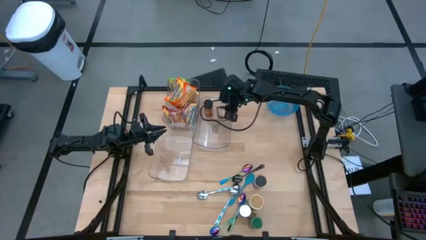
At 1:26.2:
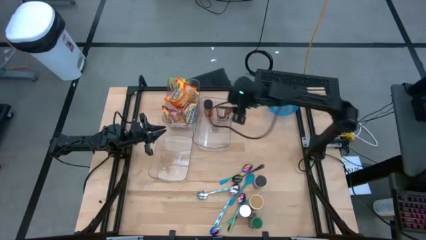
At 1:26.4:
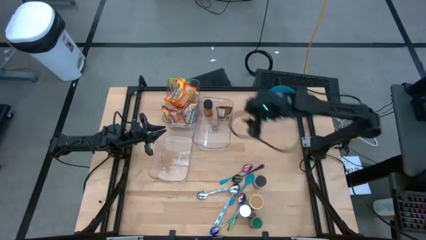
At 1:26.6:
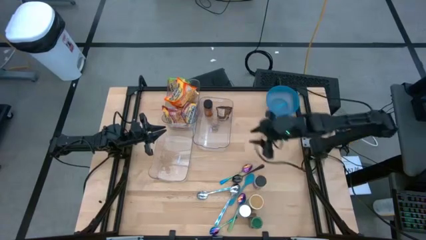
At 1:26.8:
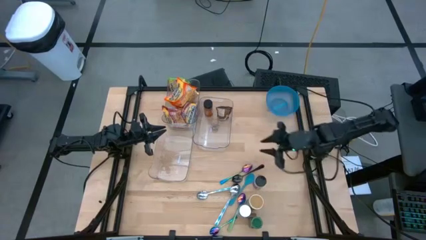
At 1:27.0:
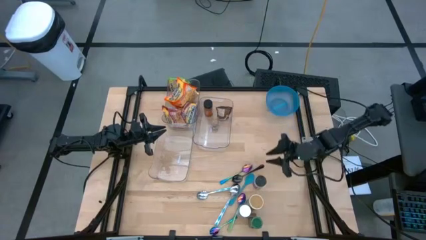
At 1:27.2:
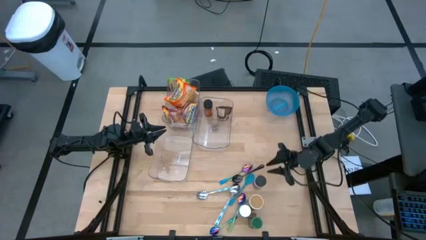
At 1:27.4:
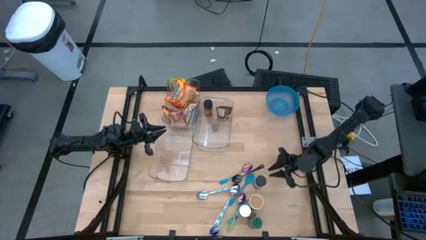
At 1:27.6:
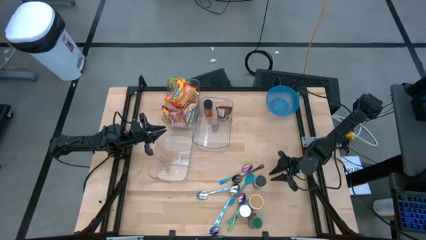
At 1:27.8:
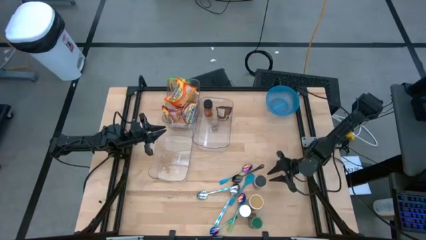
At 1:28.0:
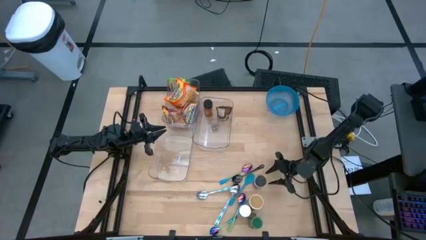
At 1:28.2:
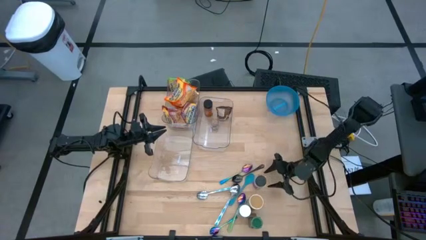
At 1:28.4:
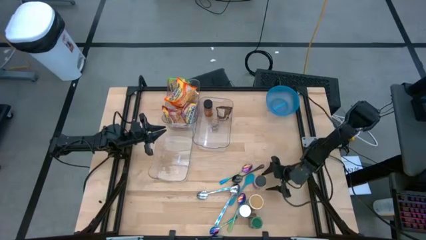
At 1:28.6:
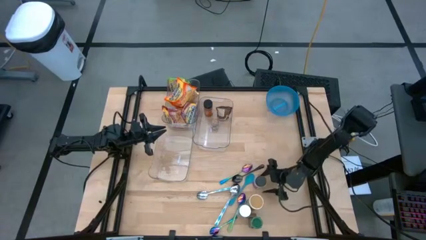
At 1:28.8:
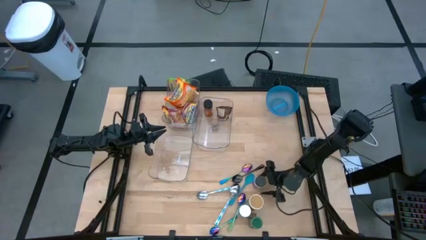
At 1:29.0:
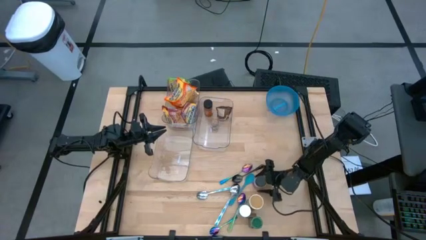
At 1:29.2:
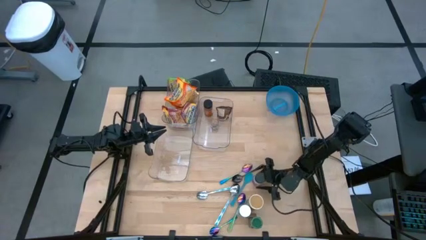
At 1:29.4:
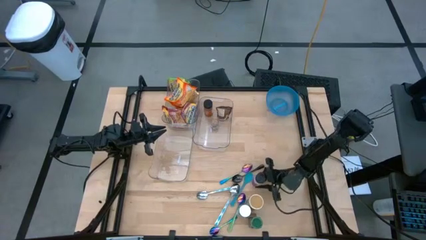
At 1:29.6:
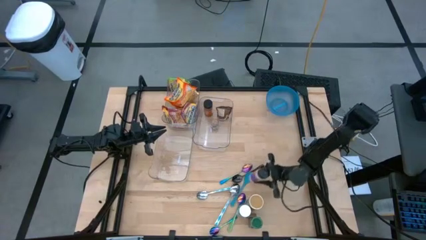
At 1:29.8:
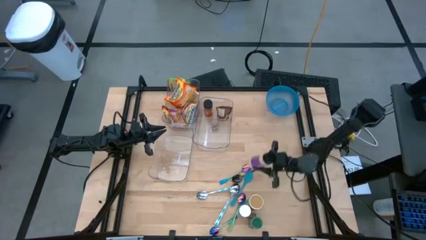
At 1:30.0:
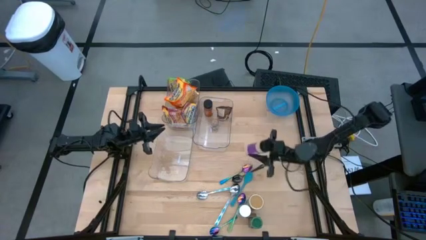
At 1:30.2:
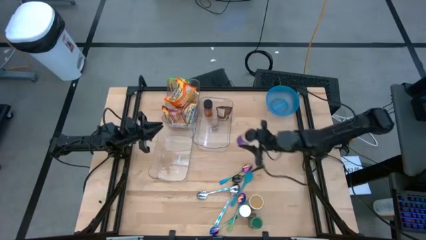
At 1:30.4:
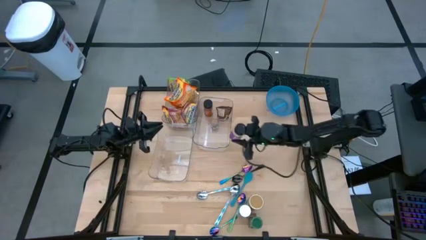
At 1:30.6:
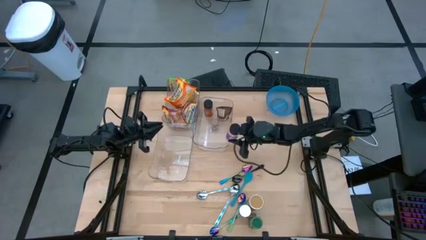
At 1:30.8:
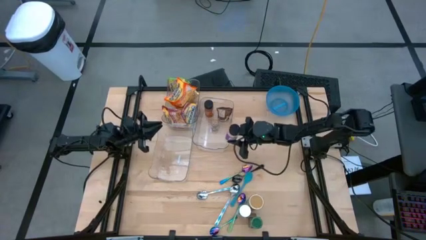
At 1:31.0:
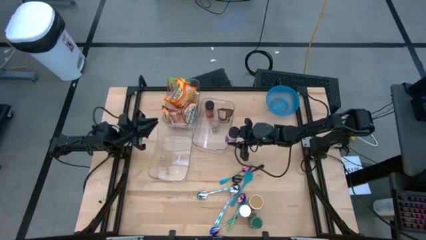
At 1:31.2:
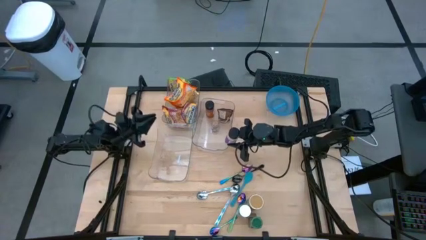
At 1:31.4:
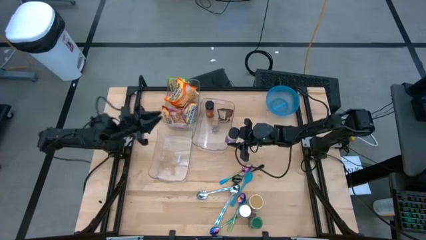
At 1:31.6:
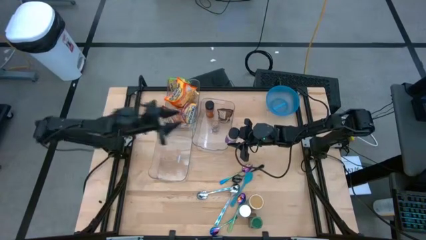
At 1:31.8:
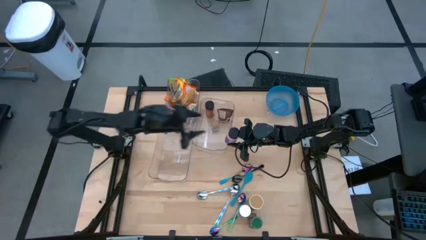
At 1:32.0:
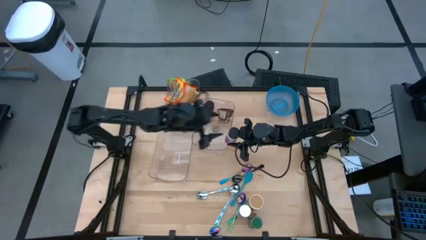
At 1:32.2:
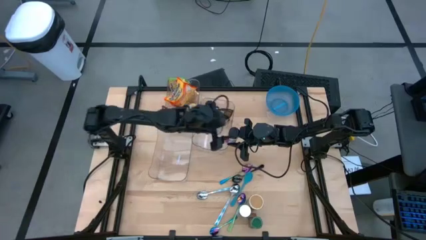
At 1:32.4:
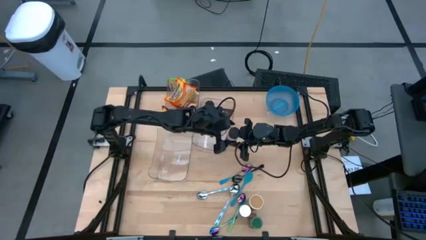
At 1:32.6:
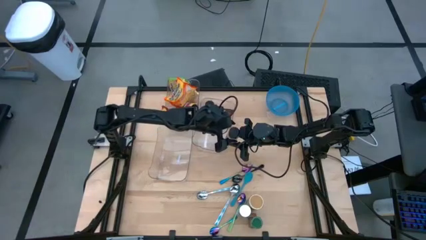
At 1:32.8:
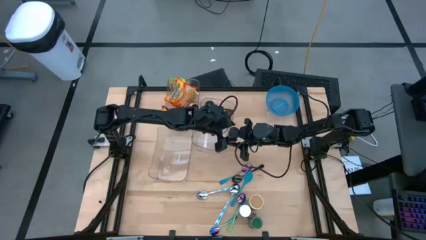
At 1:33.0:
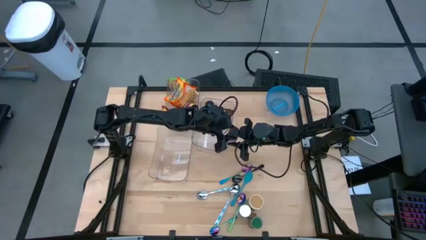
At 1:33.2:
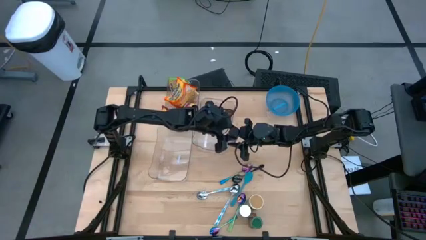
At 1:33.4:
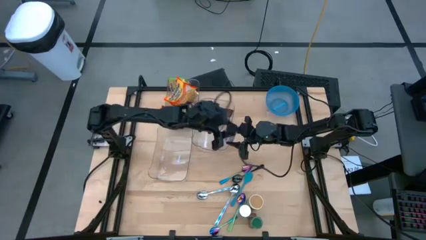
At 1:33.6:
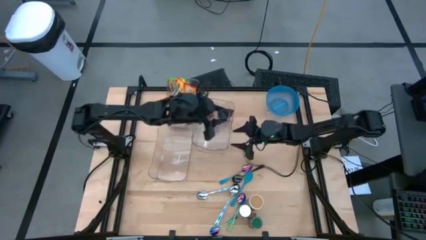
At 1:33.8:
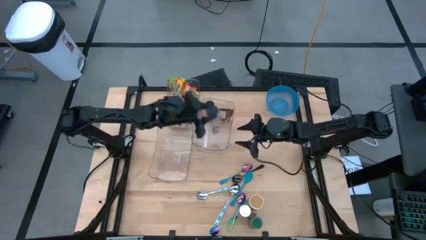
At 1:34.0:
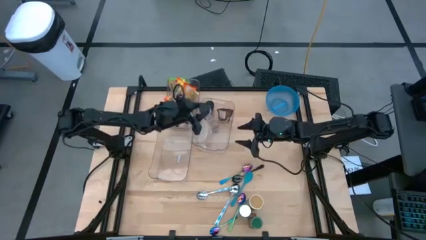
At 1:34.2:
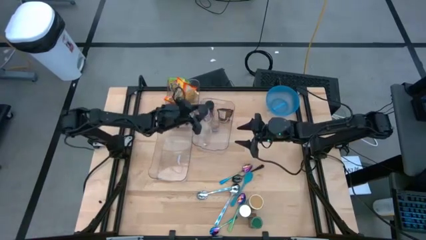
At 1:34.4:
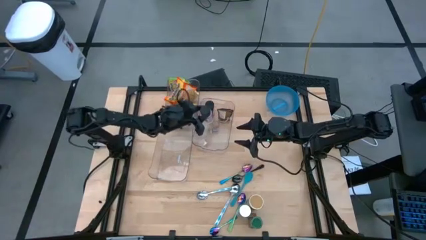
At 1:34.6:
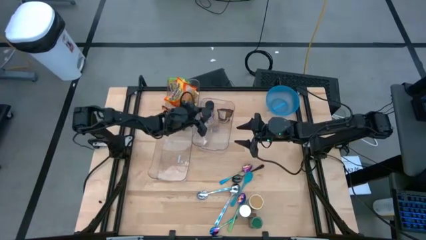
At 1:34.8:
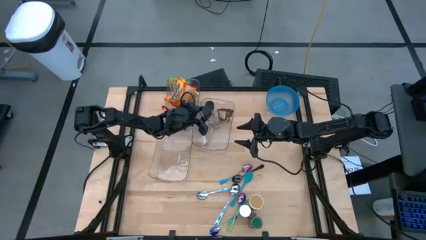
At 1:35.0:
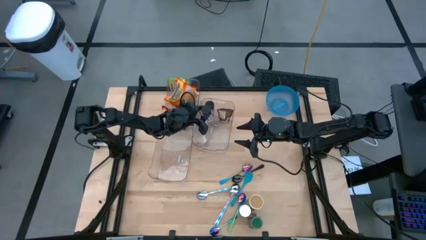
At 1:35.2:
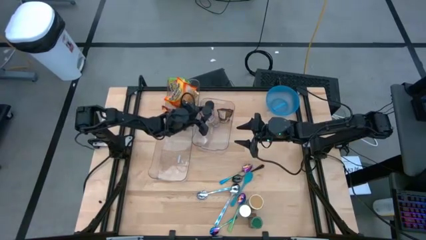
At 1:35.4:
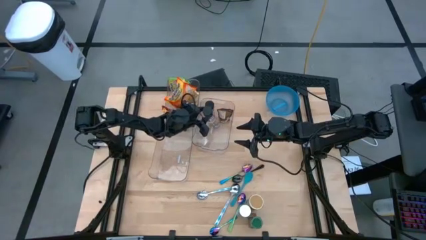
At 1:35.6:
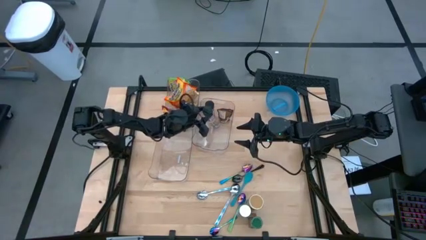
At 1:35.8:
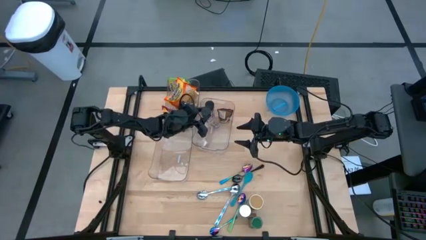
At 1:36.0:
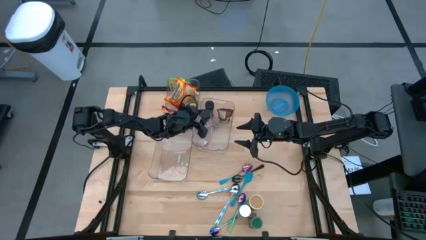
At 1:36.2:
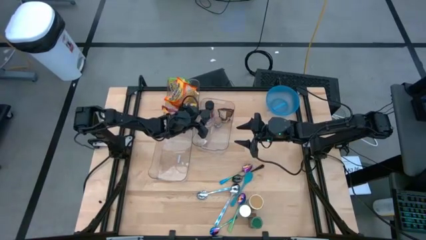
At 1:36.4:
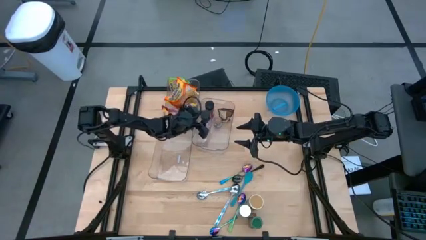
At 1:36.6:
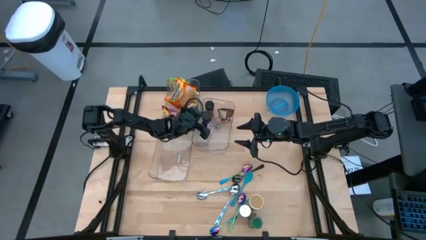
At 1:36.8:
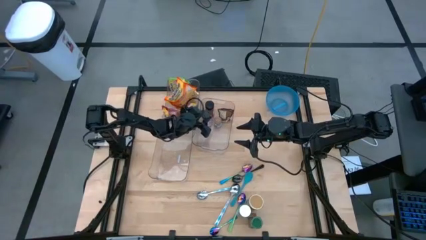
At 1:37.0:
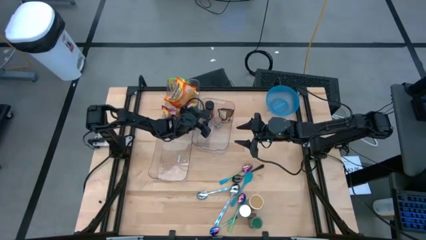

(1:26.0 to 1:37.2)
Task: Pick & Place Food Item
Put the purple spice bottle into the middle transparent bin

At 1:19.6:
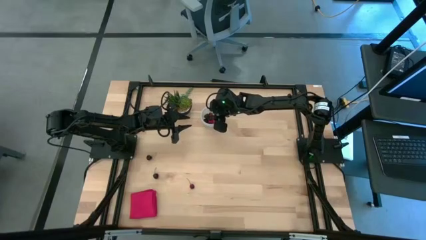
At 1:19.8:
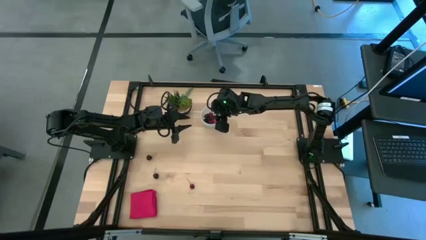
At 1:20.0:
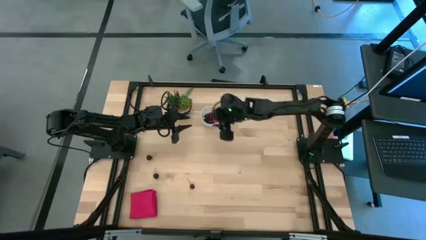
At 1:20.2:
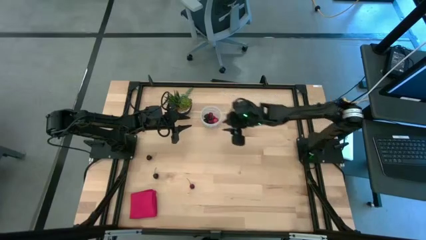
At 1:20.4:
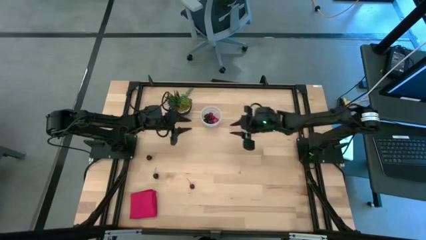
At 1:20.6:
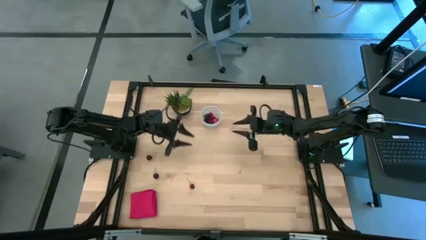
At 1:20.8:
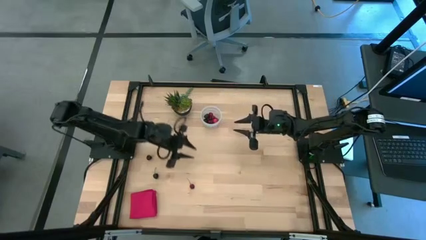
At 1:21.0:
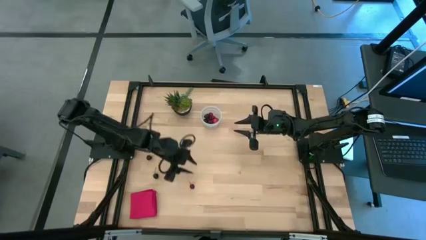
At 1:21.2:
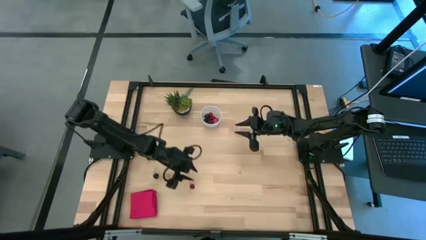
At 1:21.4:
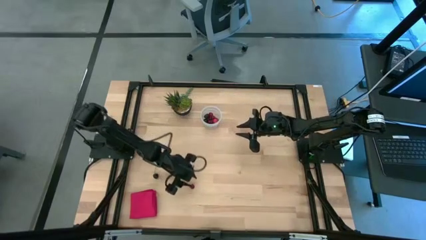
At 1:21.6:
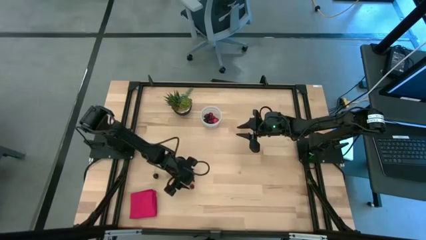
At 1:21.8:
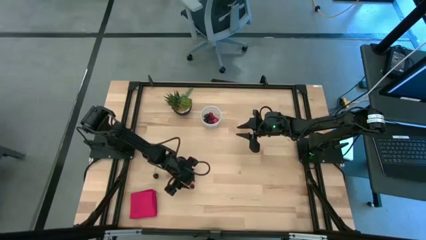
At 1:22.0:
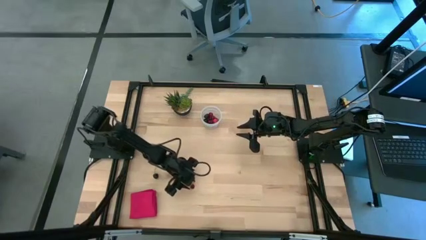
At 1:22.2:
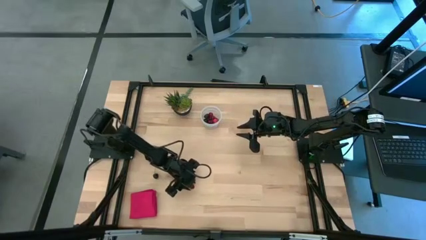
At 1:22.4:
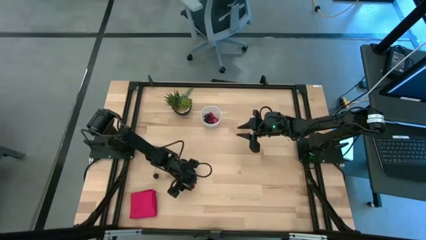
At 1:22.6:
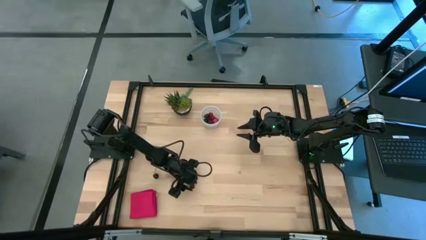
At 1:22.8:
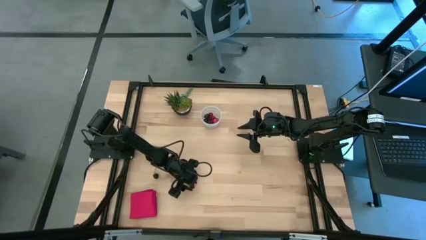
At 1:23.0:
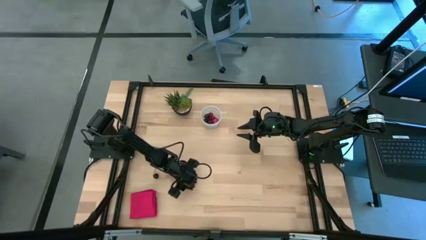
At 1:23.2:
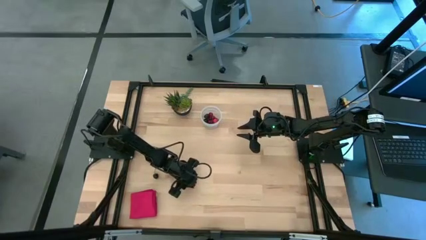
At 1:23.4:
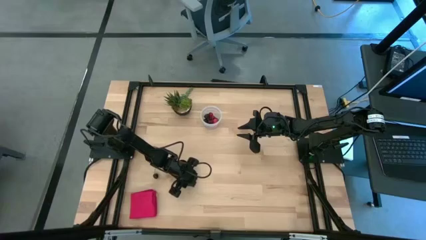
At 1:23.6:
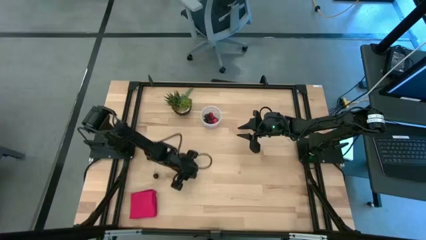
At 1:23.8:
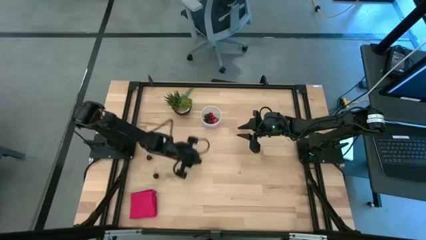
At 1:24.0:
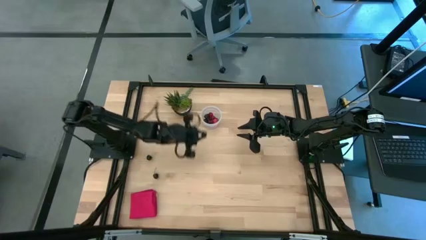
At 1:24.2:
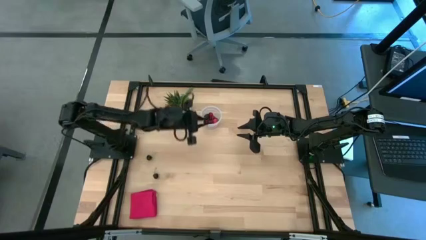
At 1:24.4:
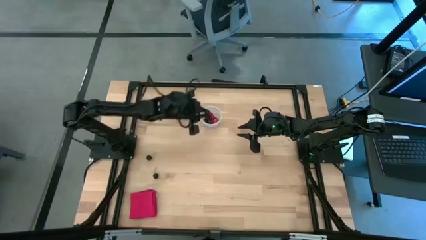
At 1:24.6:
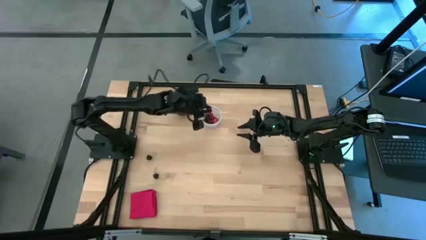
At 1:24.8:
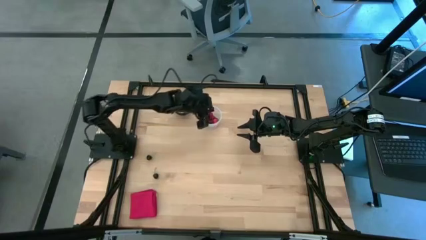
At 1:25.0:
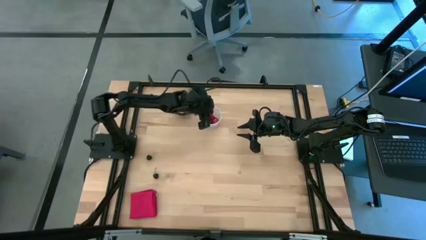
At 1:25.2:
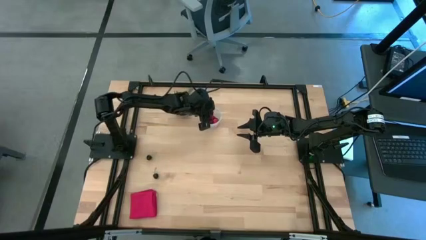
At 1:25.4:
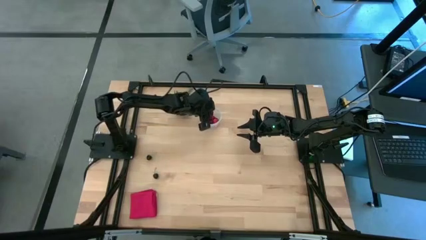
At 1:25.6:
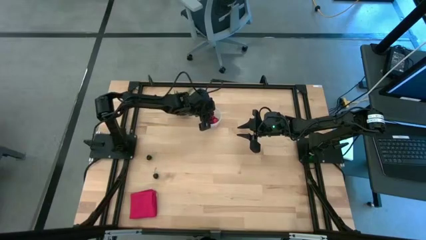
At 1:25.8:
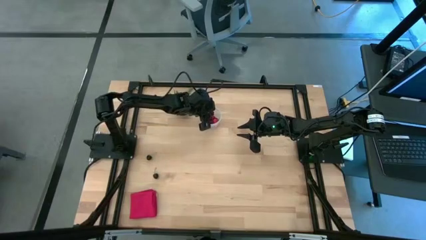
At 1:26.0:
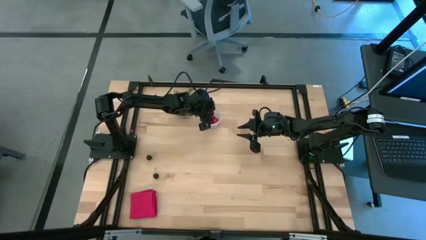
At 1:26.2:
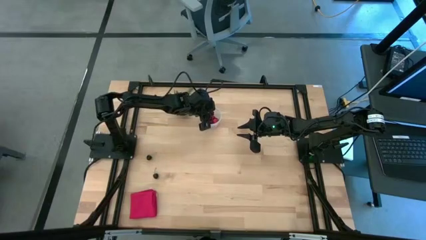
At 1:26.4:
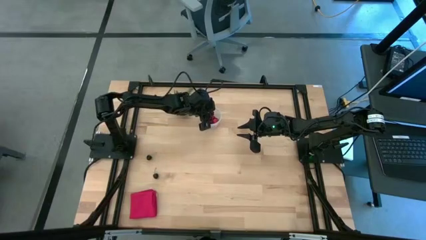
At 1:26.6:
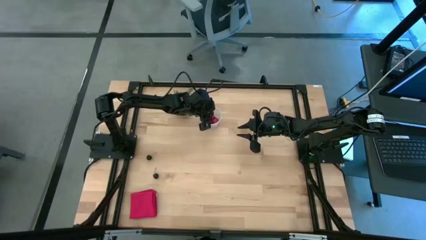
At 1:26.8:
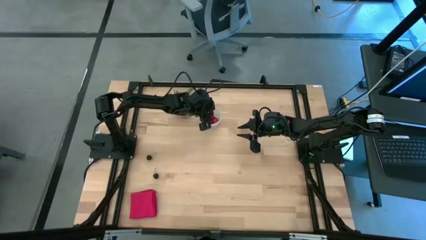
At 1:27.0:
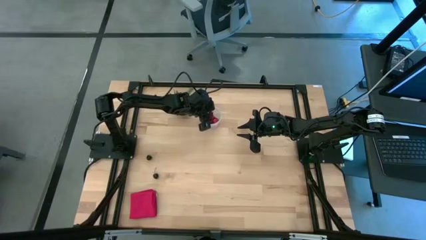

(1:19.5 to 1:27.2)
Task: Pick and placing Produce into tupperware
Put the red cherry into the transparent container
